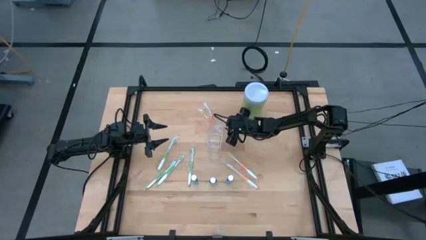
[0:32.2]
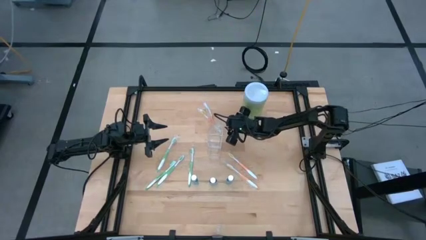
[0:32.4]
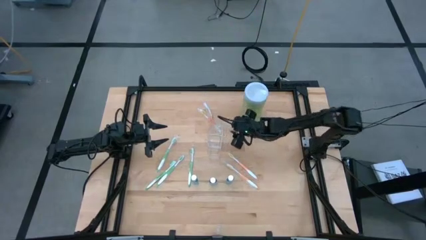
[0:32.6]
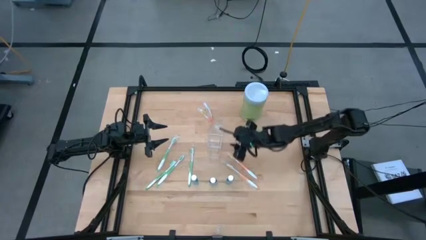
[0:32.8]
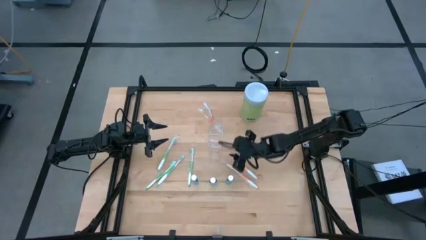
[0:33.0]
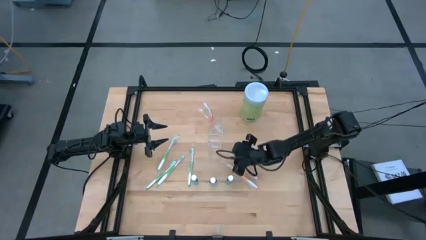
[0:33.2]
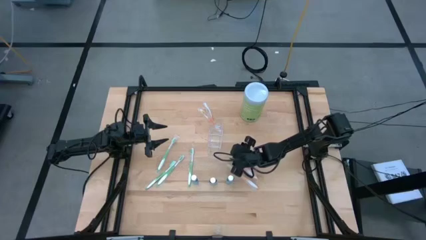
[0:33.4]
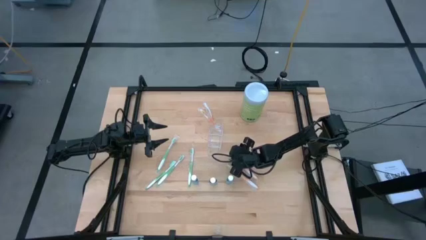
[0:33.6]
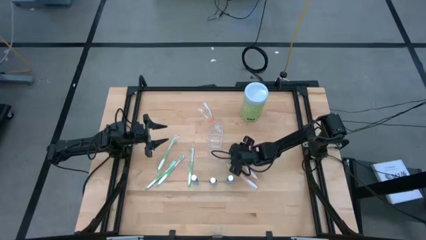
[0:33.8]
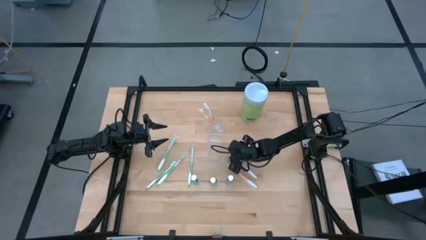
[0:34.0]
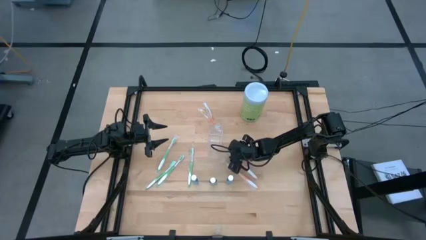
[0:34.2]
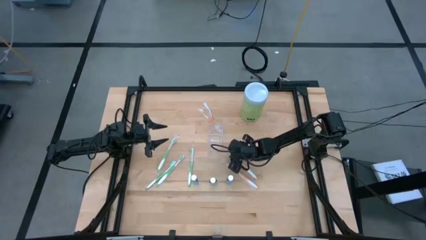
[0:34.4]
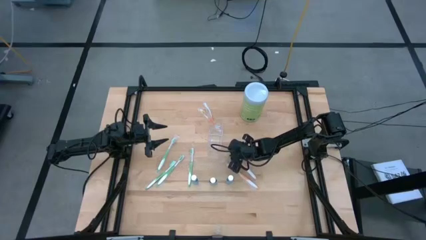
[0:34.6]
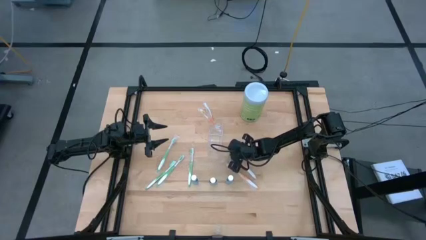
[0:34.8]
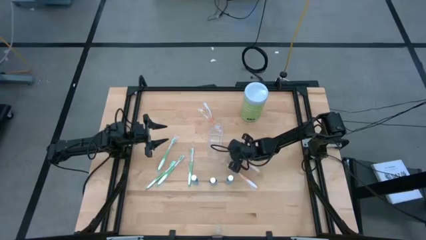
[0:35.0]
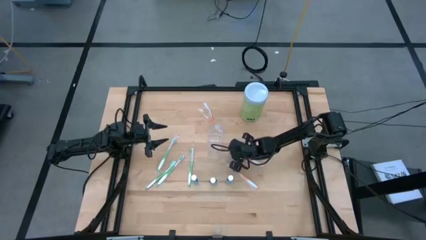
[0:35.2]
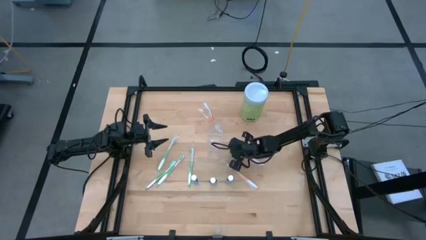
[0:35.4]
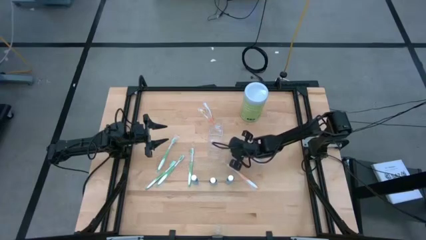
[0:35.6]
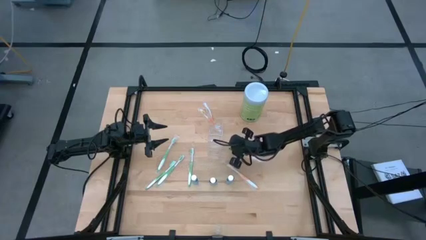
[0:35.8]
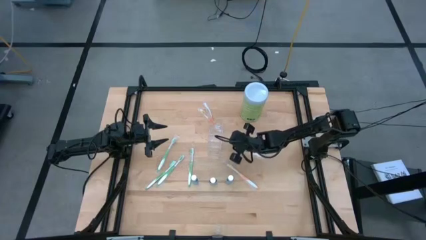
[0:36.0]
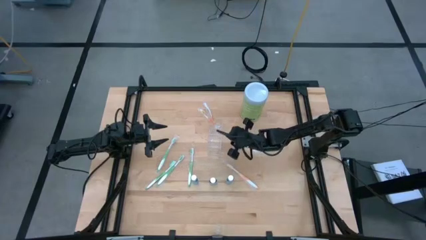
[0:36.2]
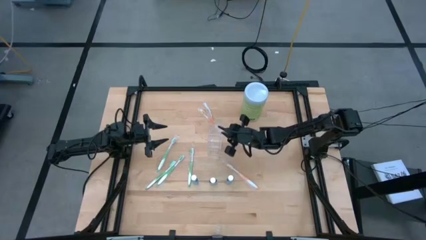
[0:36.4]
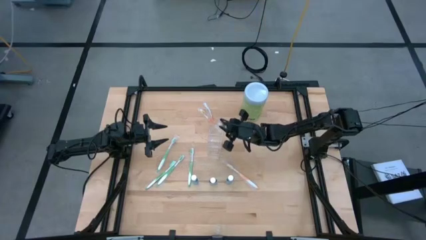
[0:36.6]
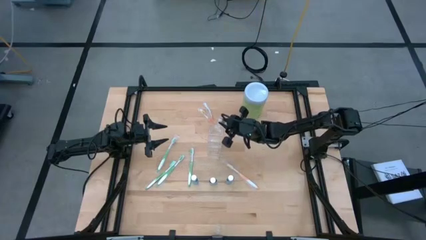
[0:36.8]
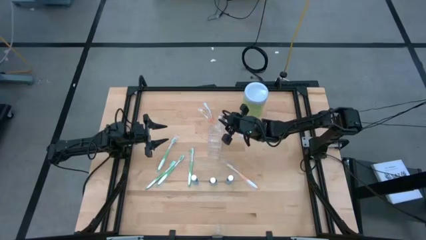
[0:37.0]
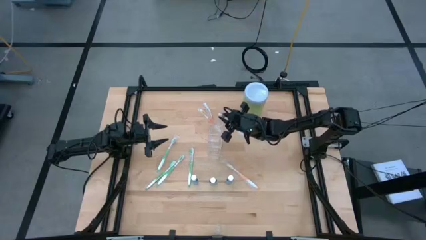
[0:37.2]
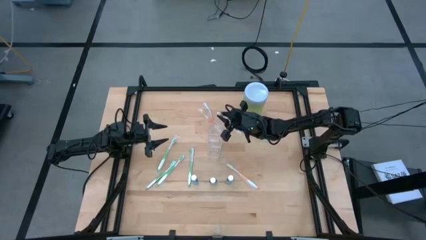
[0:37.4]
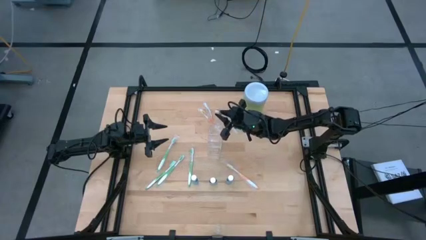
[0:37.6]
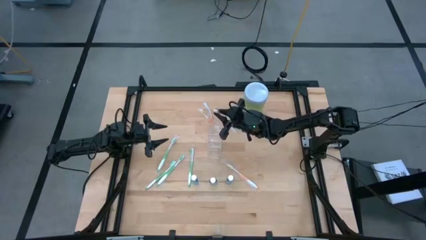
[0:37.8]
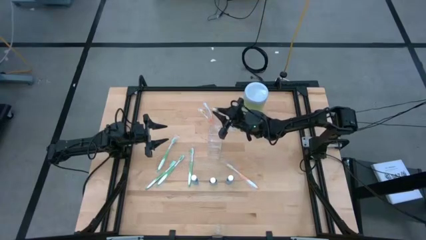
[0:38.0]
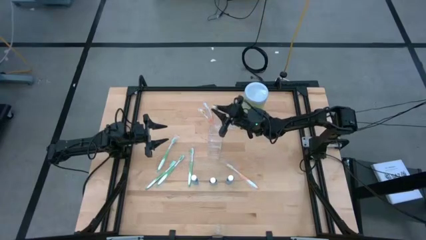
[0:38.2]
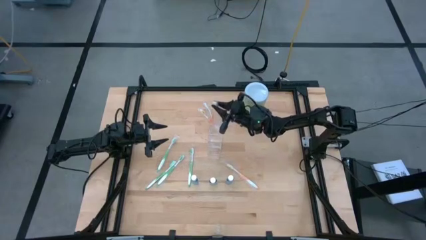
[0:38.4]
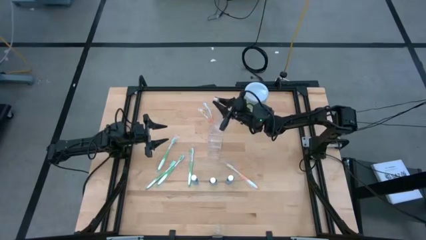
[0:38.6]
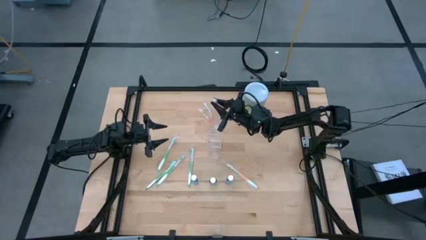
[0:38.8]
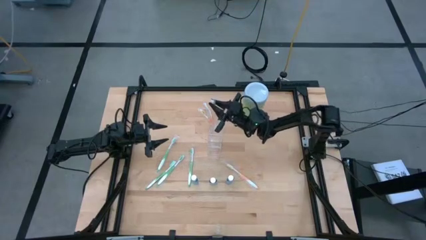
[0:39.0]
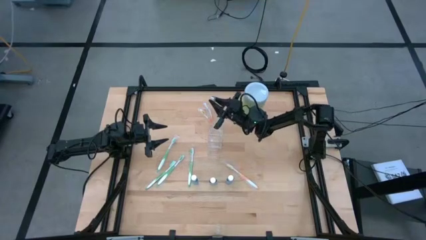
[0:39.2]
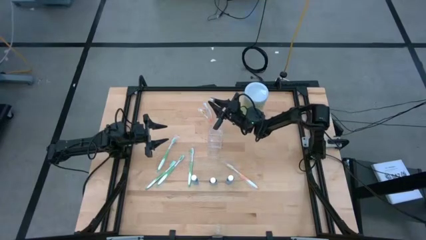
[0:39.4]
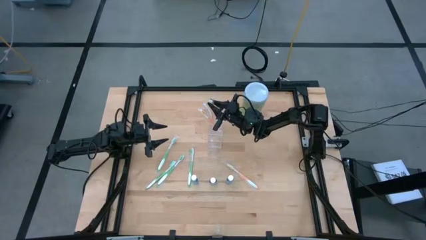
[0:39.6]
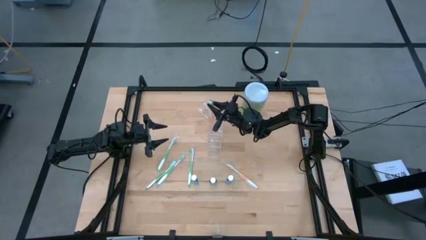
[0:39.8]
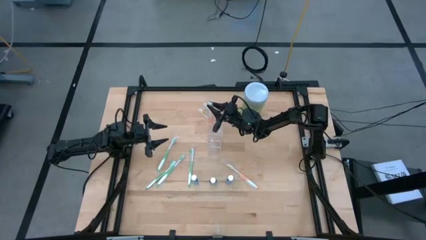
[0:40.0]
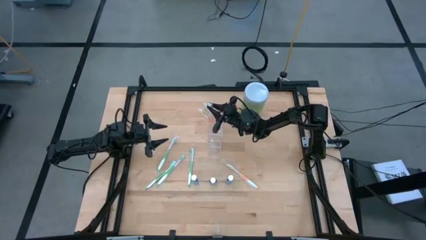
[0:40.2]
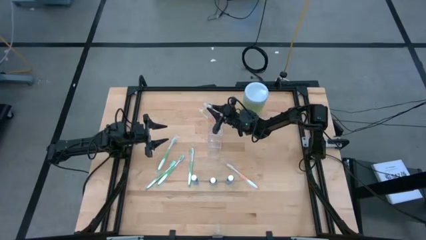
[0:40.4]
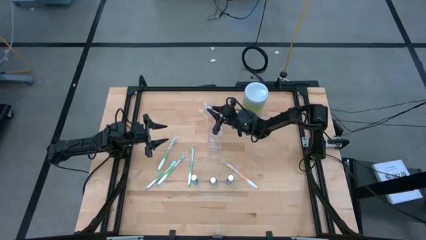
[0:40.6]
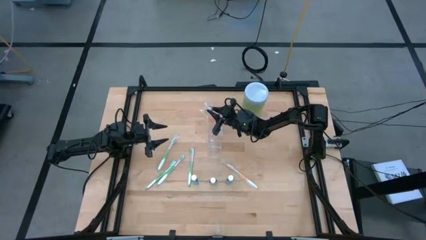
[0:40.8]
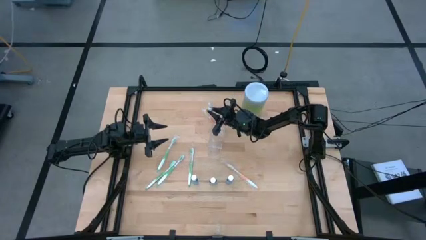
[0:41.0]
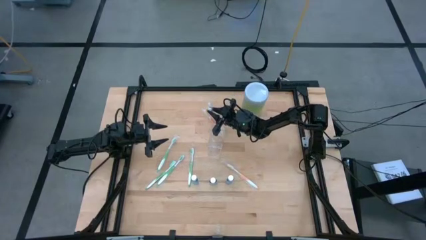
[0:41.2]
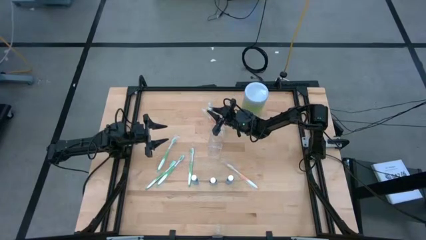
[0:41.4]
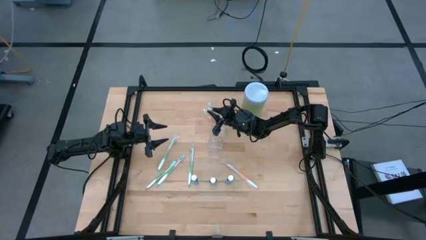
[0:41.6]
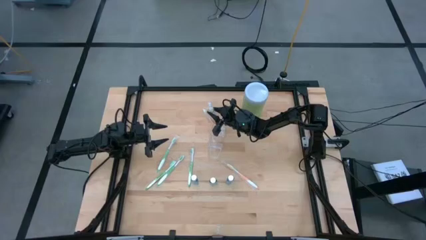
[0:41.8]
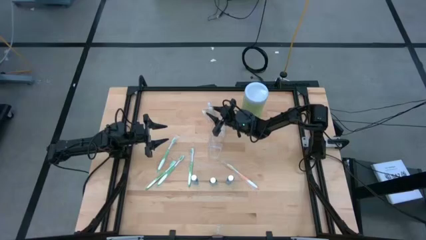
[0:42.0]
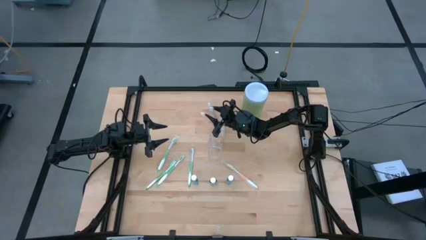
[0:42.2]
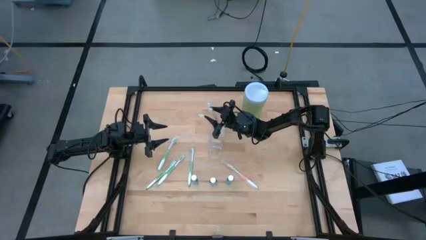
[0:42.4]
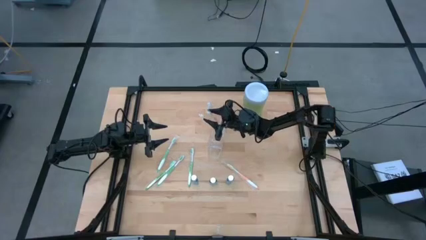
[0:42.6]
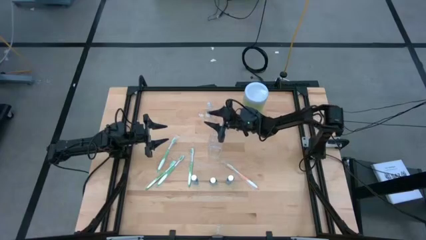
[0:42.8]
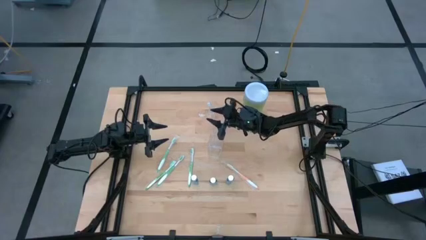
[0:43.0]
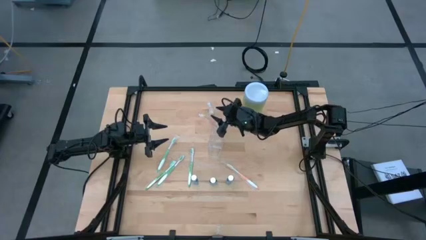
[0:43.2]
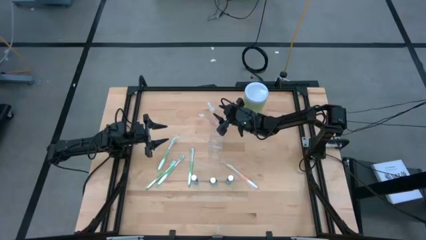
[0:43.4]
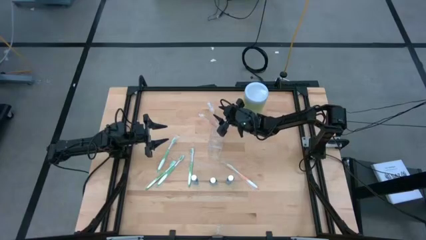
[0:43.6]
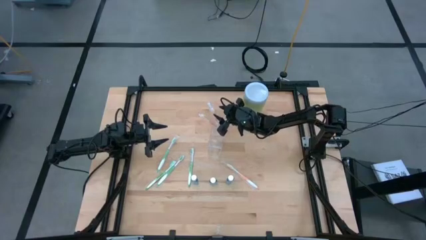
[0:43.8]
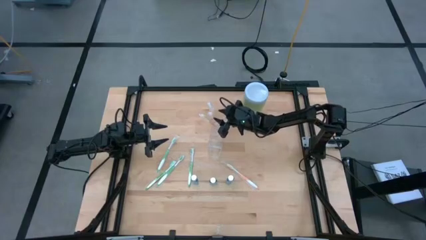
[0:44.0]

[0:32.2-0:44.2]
Task: Pick & Place toothbrushing station
Put the orange toothbrush with the other orange toothbrushes in the transparent organizer

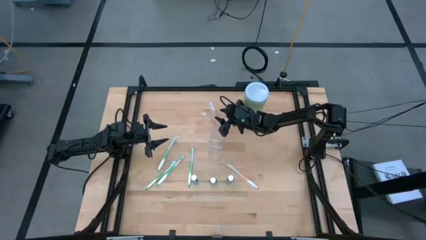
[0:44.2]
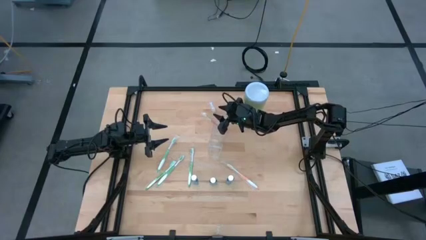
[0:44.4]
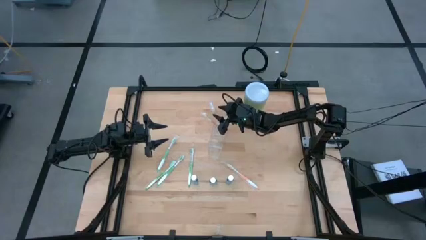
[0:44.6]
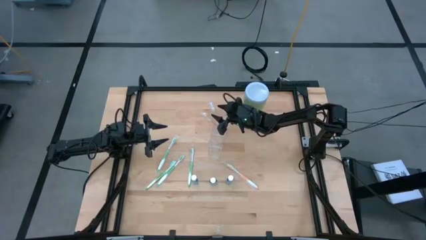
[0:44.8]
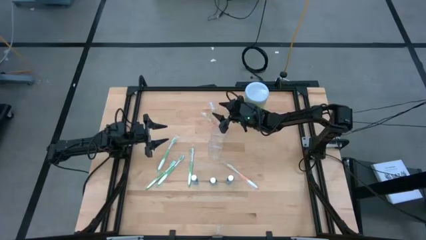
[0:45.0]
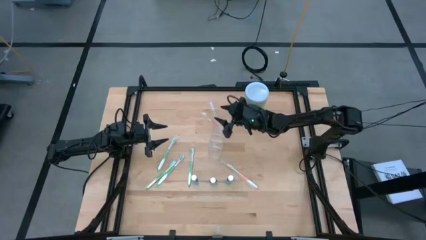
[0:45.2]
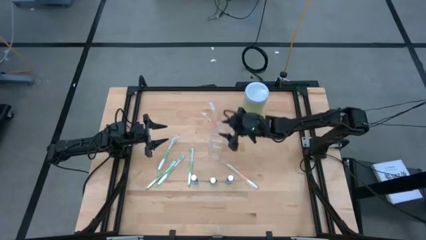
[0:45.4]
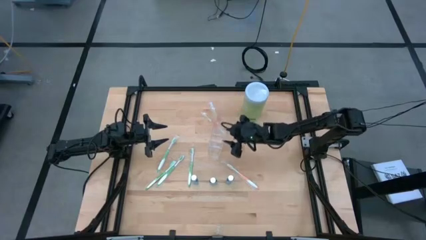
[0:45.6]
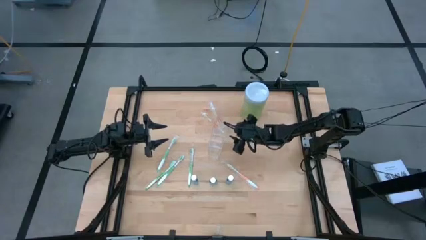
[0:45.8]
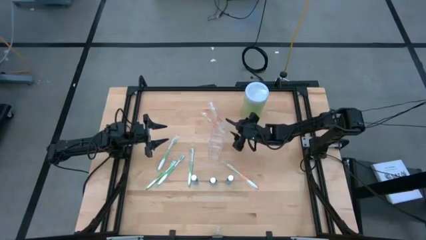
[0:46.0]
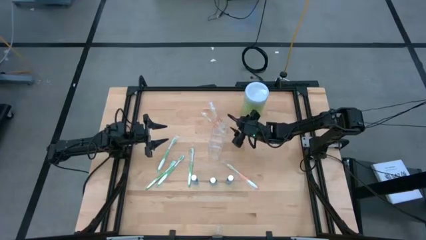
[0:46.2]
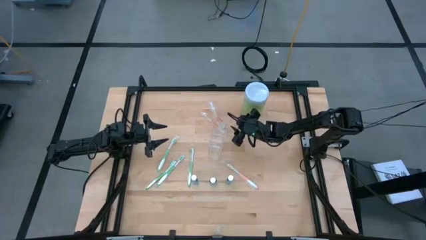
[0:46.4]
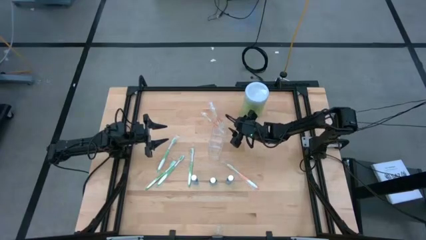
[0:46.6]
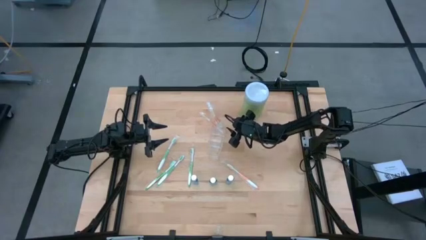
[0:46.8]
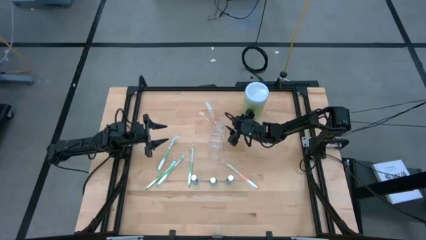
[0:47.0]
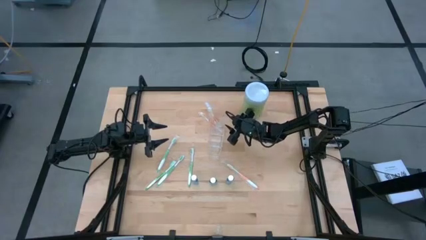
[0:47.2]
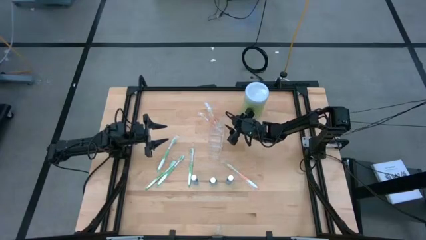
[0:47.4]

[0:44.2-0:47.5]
Adjust the transparent organizer
